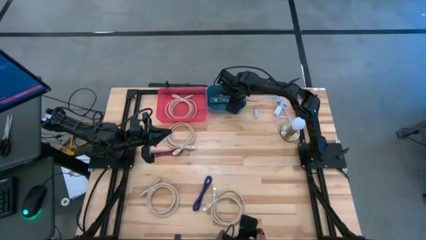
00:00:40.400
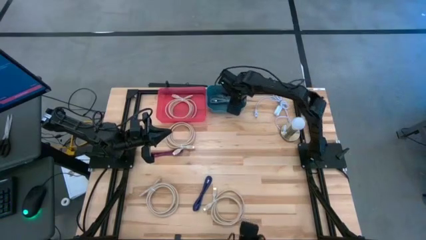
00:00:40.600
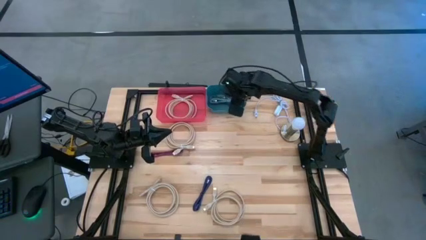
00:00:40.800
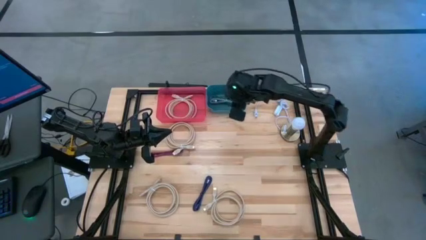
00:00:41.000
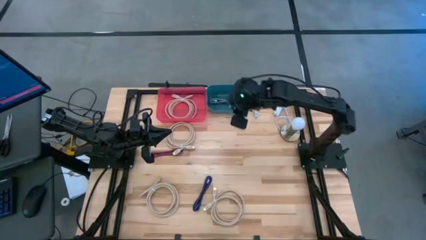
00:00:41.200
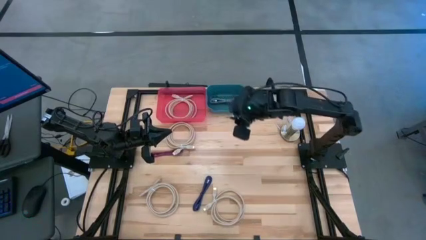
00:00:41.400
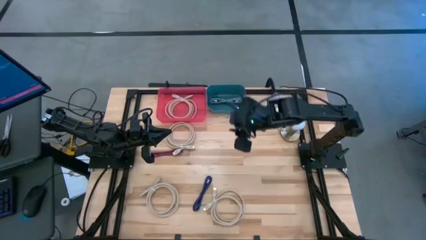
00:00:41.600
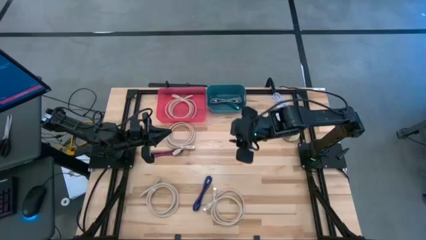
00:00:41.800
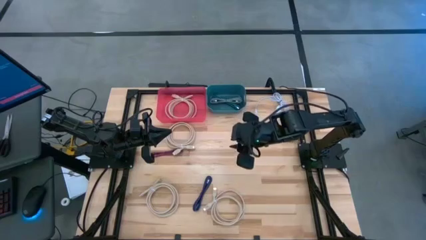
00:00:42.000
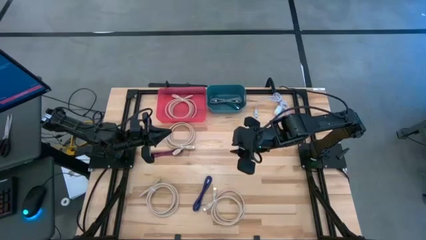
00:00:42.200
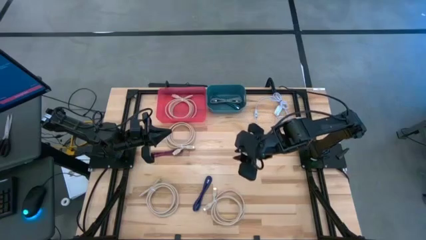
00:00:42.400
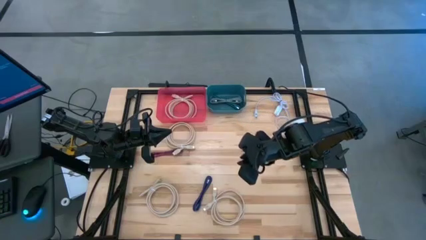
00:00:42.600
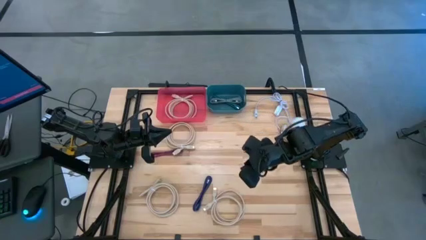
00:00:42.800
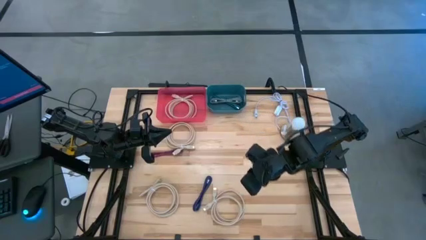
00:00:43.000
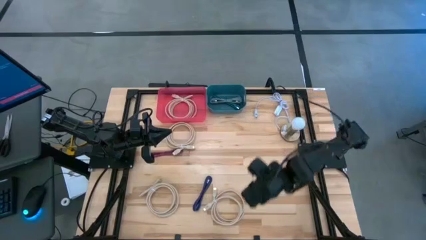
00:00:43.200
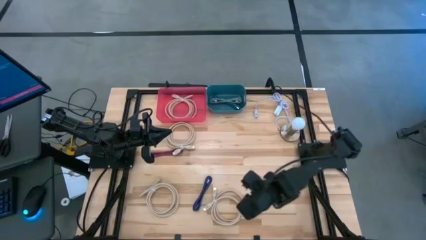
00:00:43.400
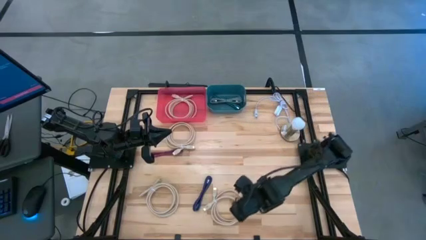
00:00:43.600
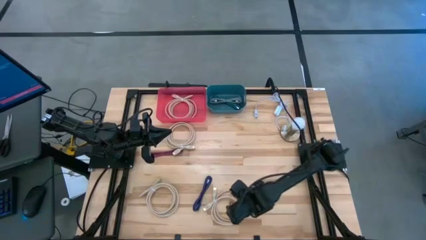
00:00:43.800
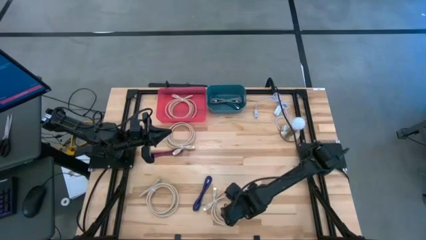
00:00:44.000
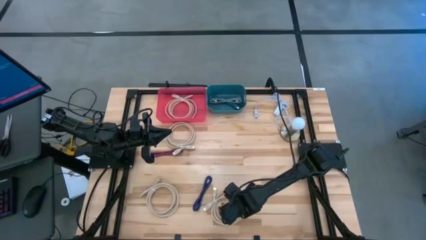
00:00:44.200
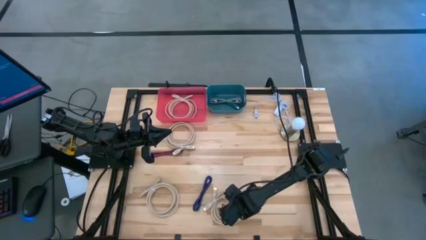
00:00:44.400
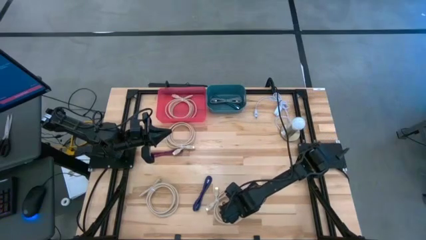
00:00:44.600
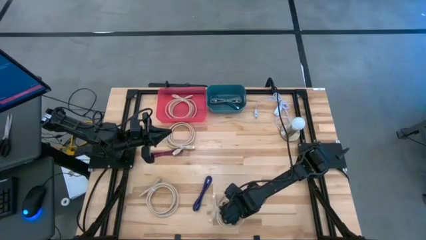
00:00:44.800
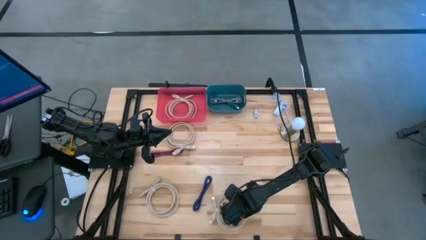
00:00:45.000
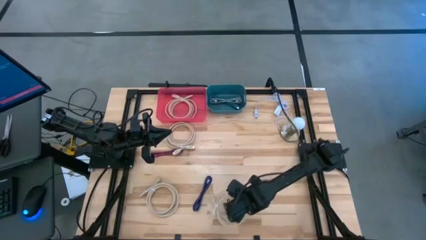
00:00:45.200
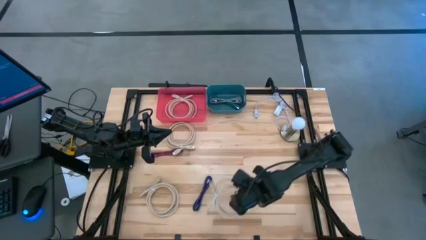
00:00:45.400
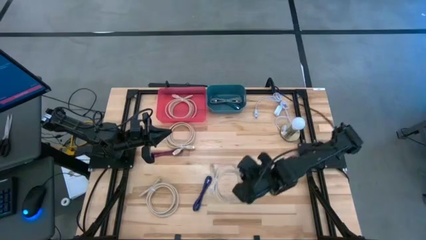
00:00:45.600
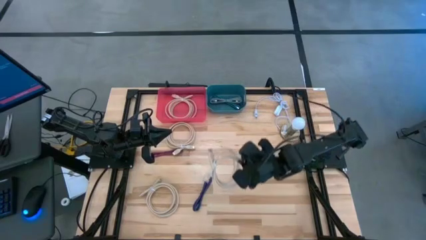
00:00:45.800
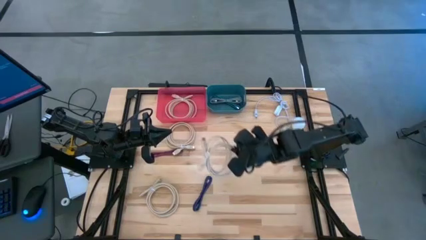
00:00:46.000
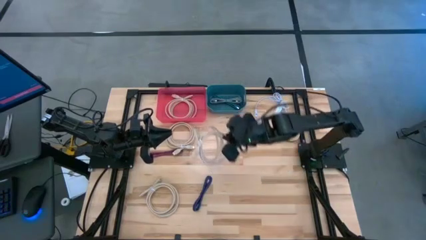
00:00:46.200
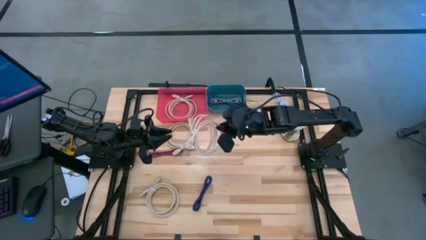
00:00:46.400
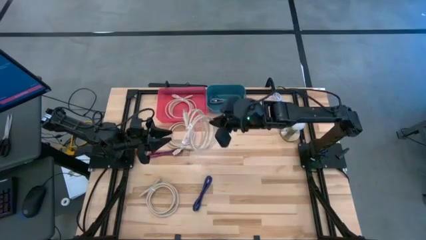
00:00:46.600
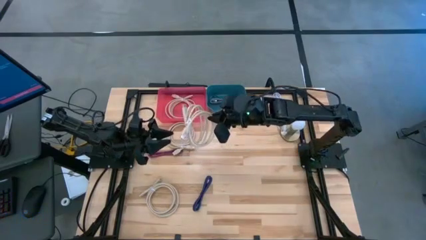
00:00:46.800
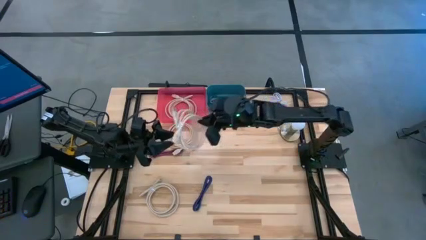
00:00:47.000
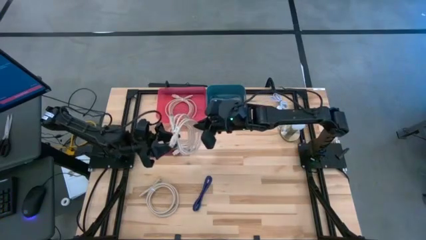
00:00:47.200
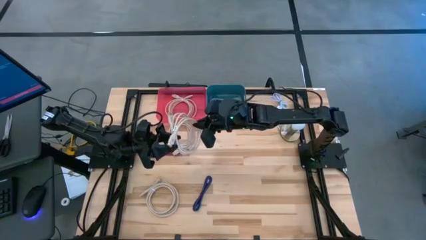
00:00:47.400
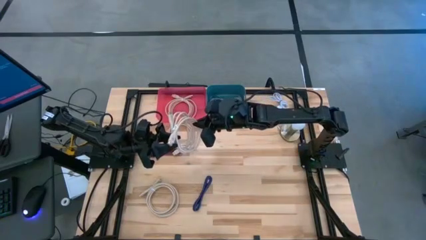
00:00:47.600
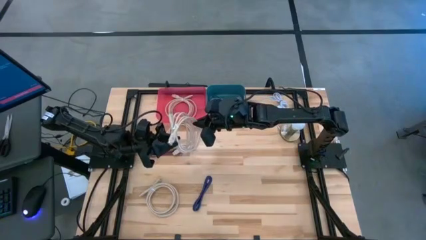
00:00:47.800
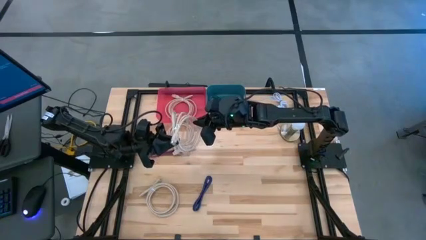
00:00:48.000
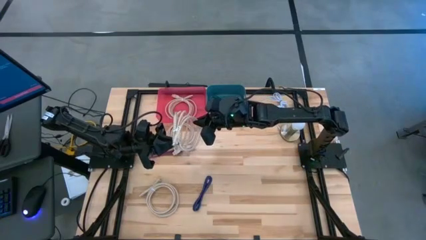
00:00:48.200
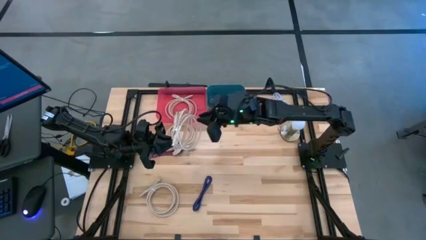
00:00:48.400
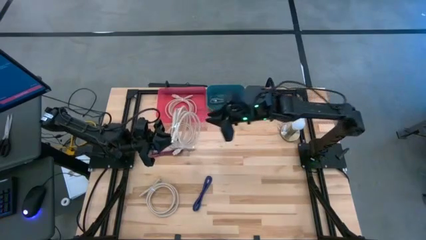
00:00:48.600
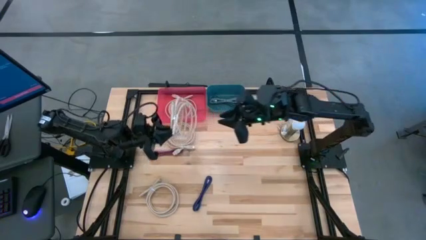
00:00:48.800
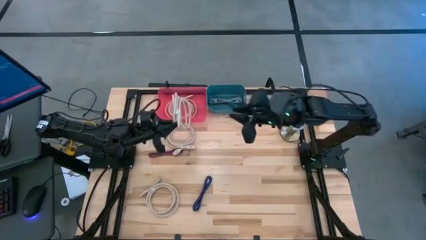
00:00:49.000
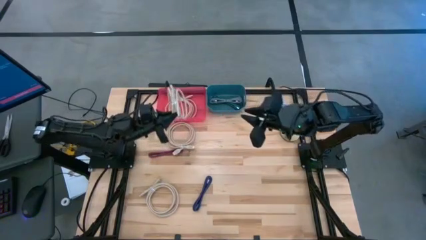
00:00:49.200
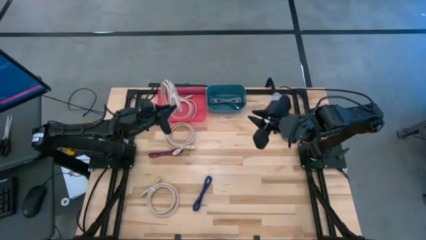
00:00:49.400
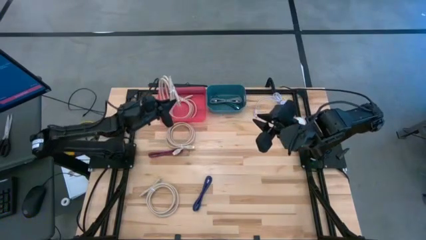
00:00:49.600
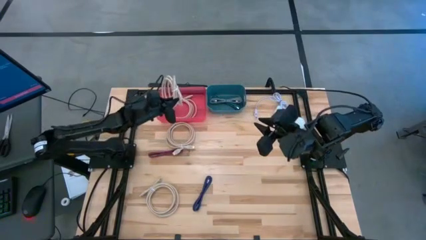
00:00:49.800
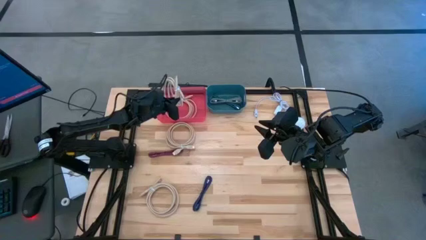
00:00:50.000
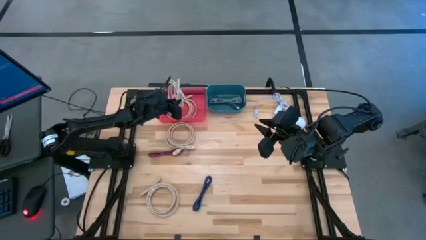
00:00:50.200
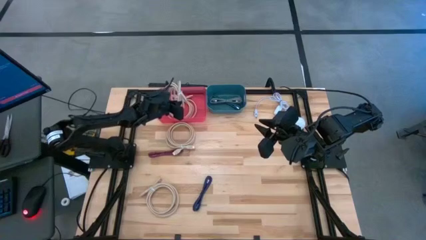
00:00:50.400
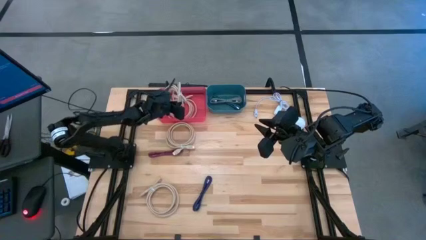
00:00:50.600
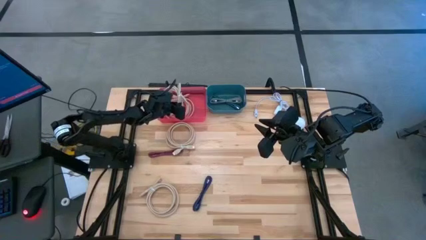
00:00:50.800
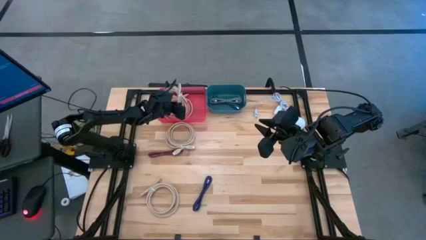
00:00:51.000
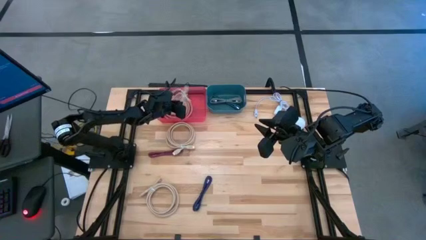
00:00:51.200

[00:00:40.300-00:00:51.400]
Task: Pick & Place USB Port
Put the brown HDMI cable into the red bin

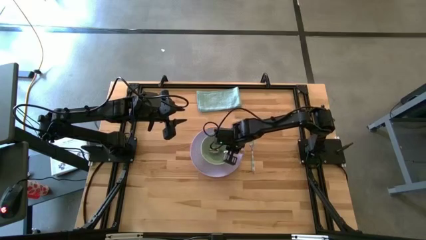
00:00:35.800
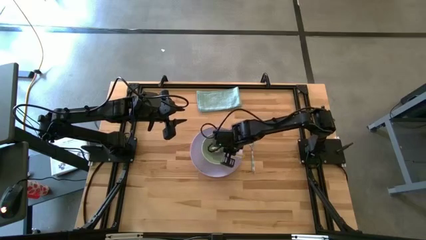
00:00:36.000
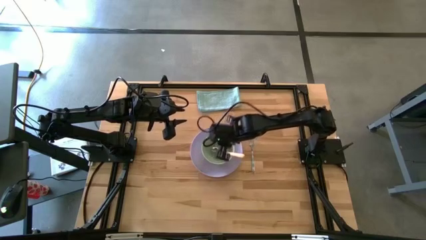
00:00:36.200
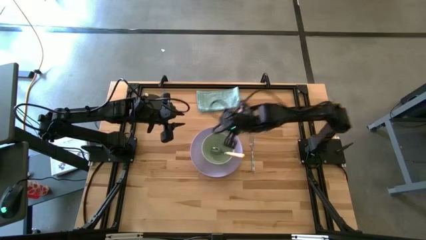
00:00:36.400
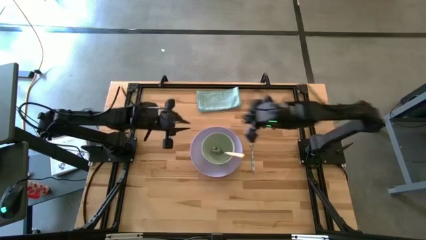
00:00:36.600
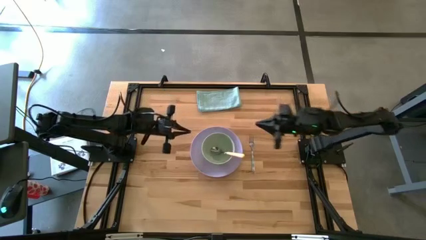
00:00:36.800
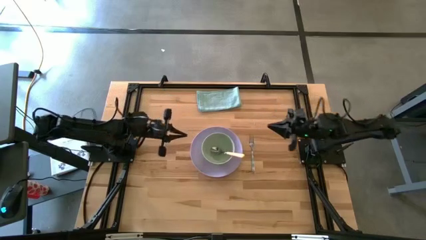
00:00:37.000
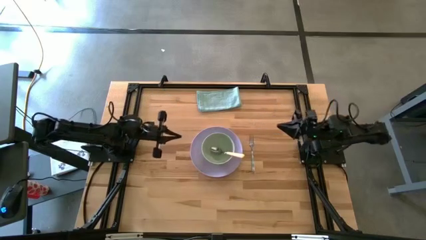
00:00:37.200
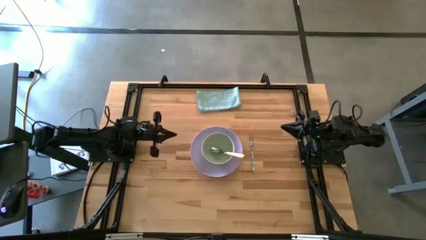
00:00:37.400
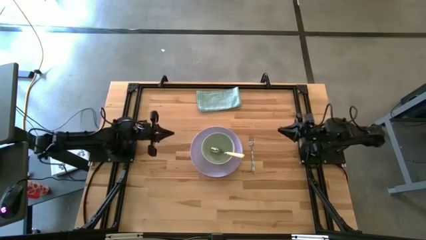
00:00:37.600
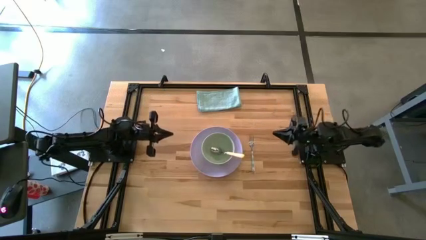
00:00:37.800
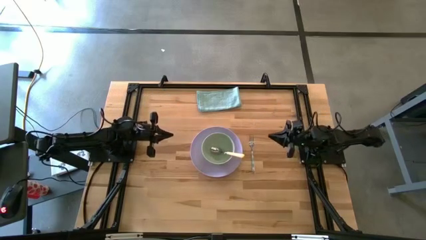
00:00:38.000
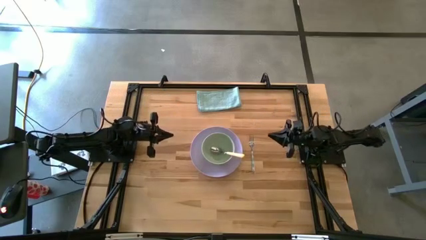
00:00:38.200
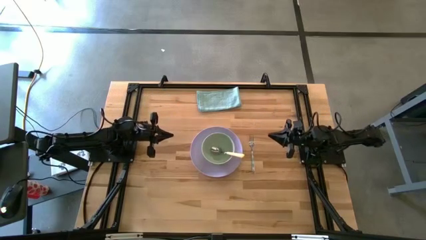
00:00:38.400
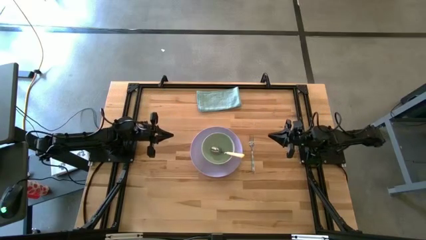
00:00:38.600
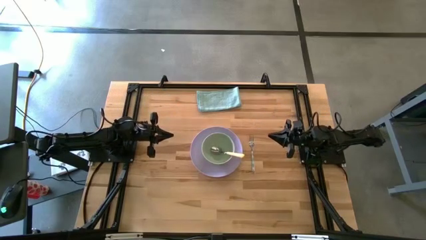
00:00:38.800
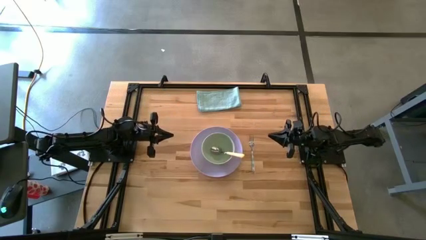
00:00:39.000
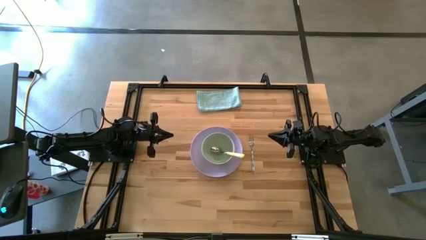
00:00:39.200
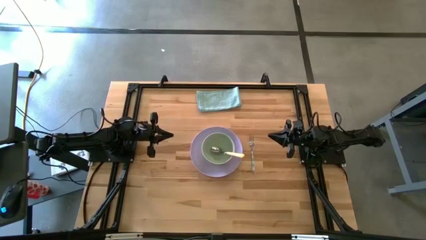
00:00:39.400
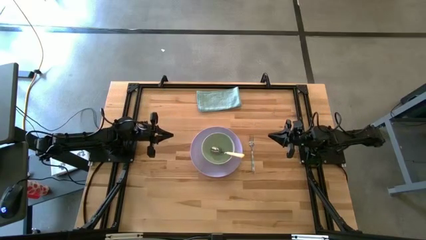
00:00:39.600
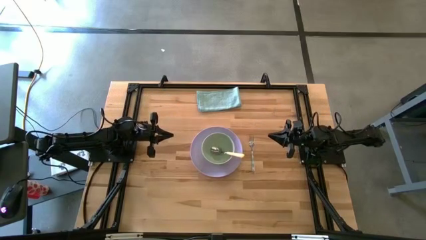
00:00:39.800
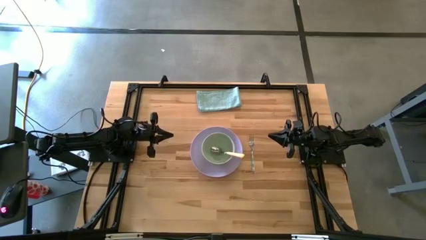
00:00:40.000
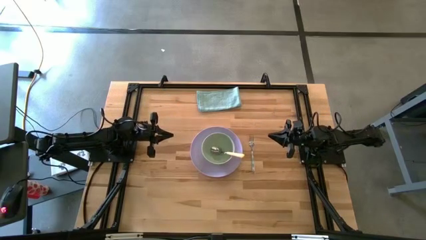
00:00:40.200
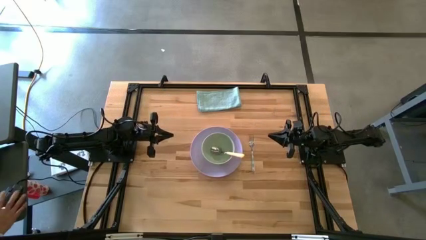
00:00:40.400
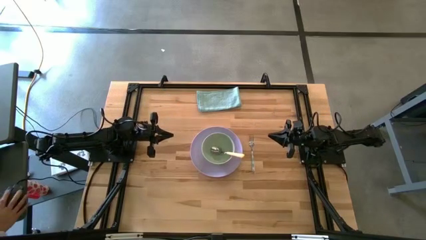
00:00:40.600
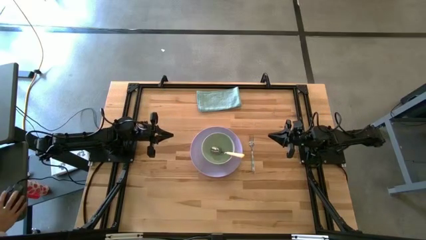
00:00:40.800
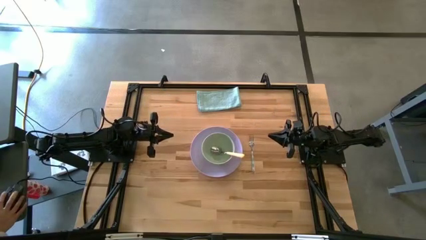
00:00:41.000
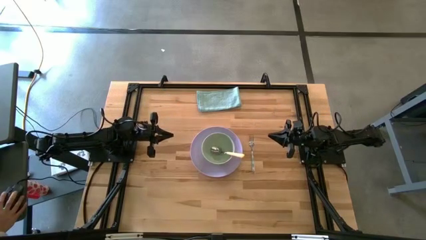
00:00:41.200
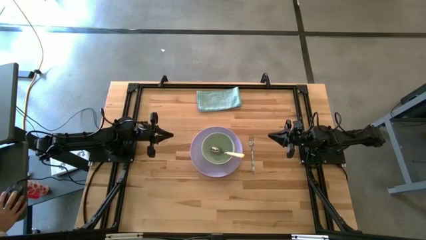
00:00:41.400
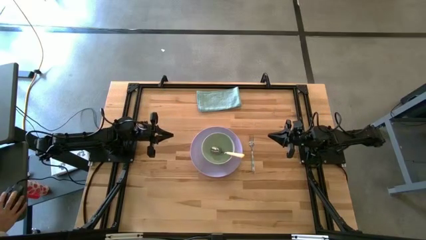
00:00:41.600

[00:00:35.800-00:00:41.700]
Task: Set table place
Return to Home Position
